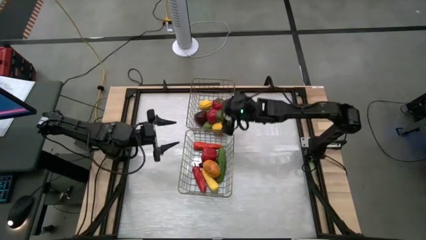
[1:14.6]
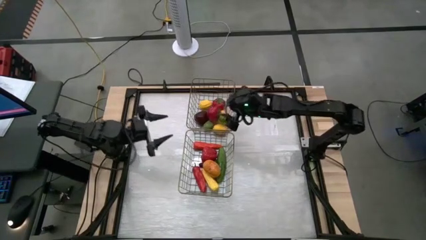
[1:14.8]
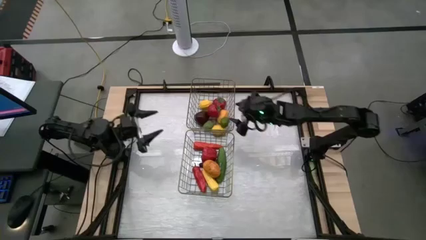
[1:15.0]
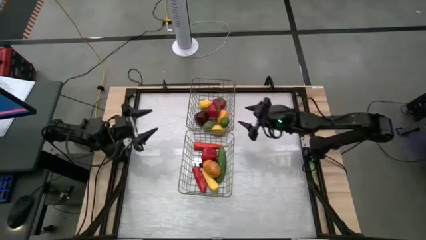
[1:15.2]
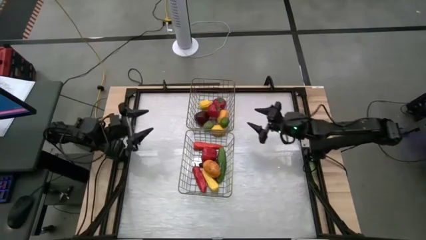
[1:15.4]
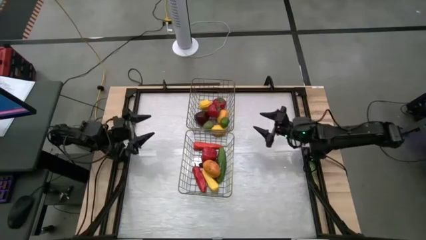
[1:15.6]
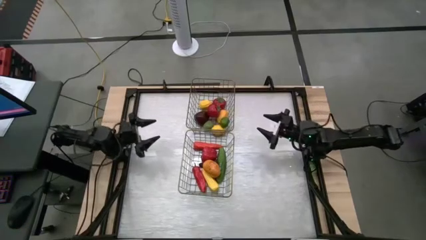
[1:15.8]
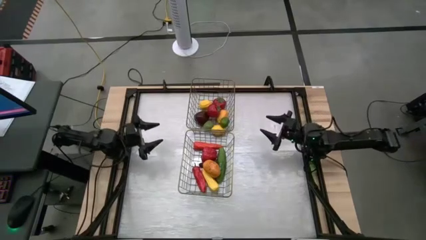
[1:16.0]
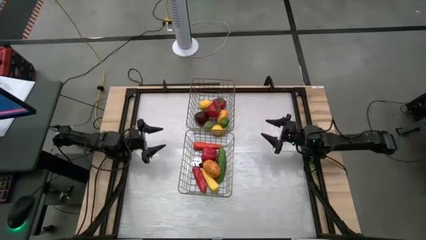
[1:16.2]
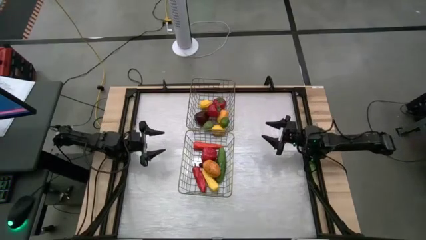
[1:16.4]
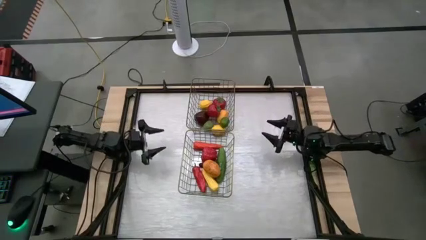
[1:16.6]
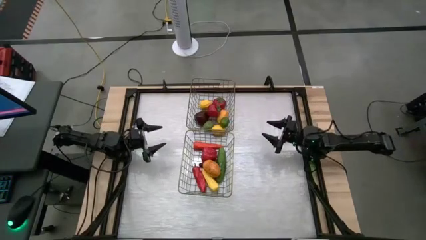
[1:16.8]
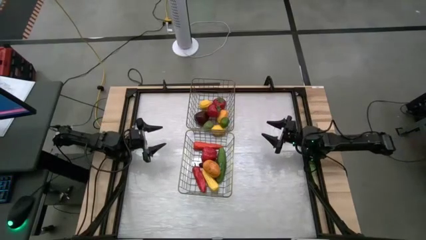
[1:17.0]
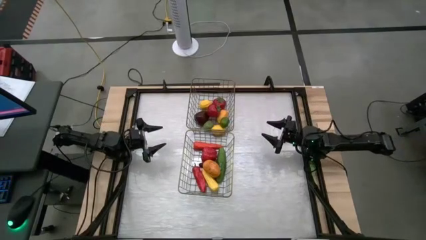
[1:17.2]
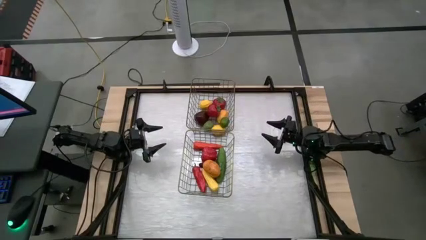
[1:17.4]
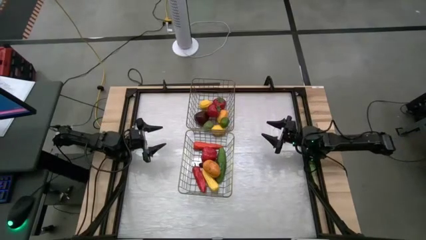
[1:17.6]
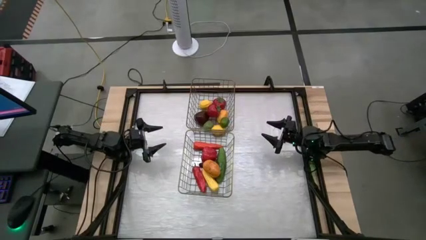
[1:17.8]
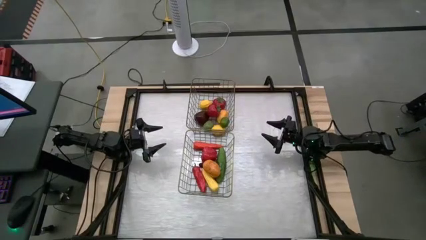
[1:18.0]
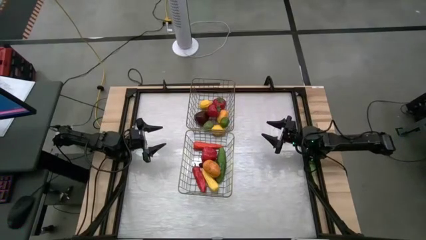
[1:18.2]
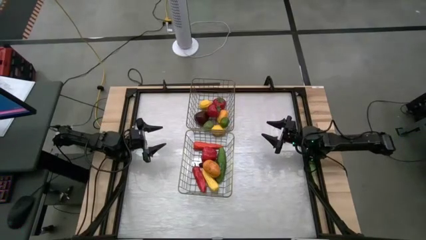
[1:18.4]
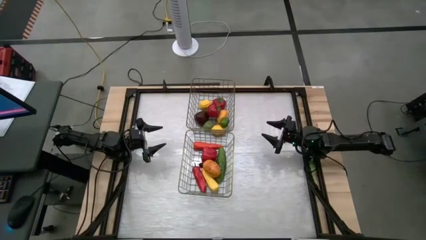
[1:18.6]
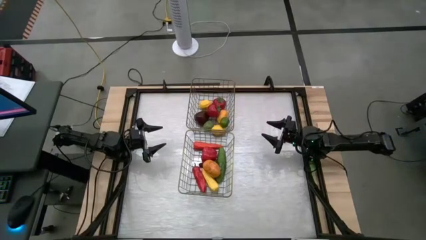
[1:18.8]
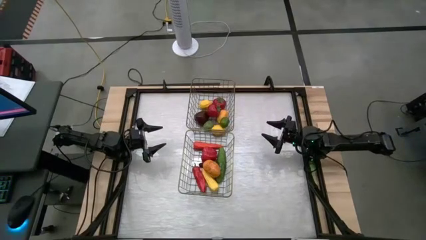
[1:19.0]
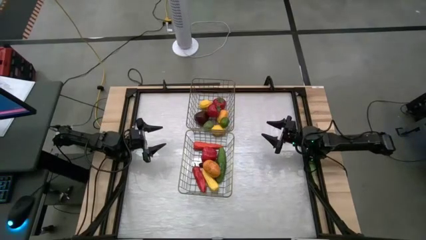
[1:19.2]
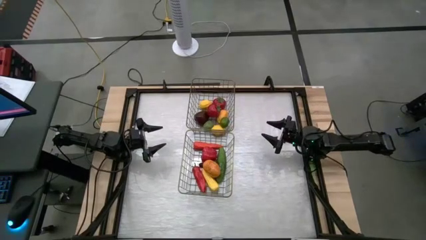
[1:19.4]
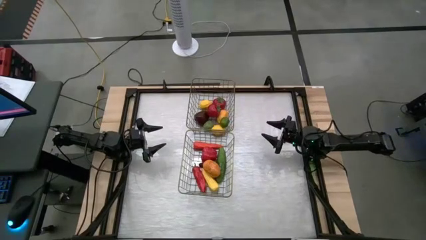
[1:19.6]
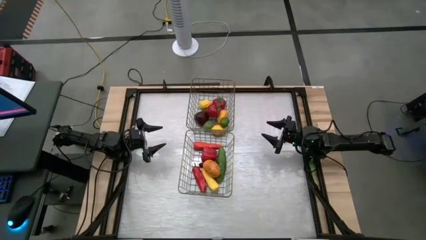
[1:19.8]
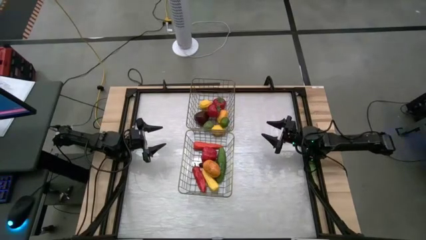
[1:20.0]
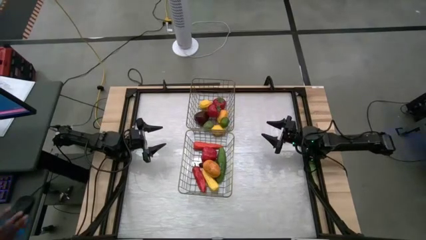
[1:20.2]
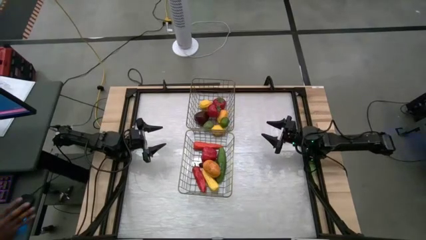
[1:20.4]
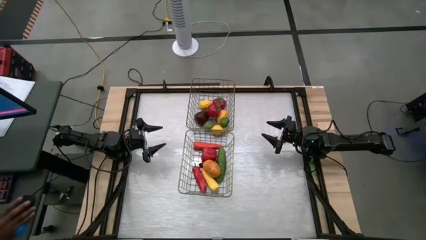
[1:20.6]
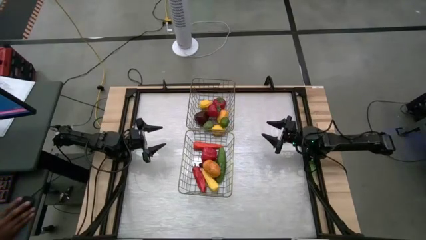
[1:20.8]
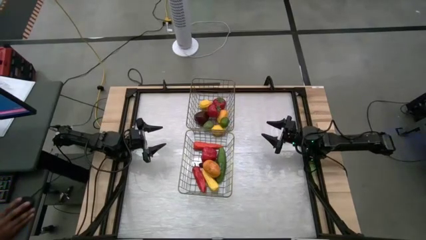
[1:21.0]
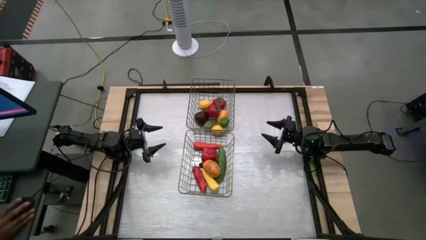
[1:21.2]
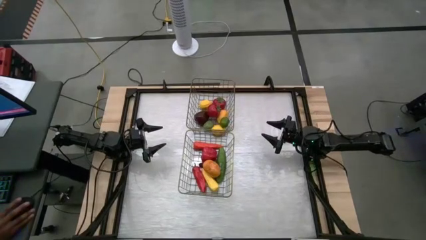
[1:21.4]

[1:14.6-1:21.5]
Task: Sort produce into baskets
Return to Home Position

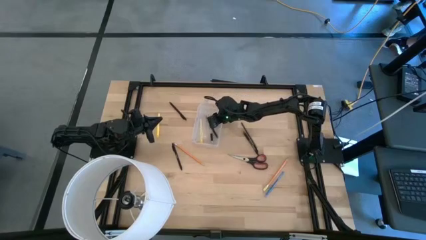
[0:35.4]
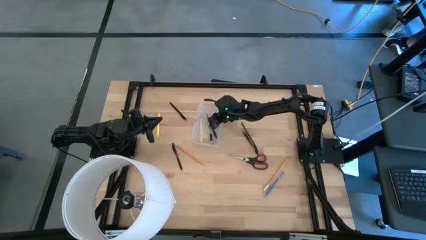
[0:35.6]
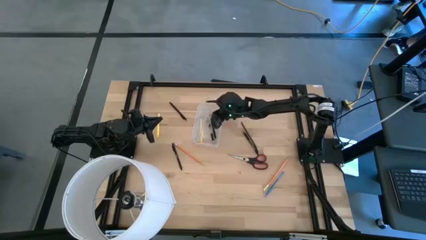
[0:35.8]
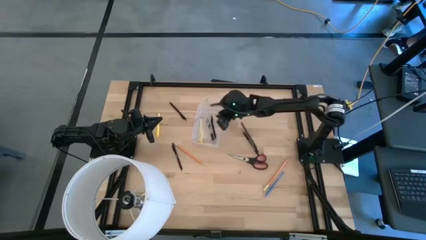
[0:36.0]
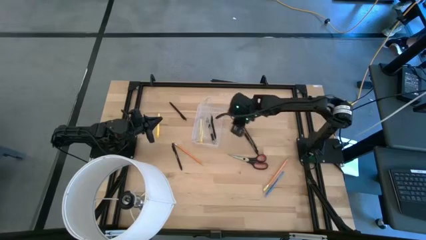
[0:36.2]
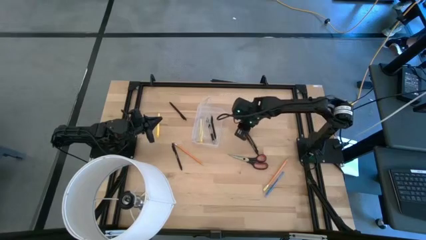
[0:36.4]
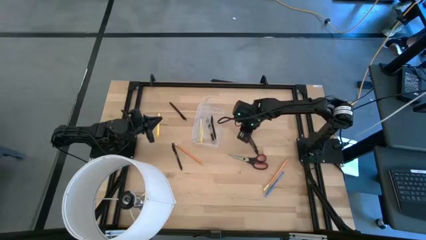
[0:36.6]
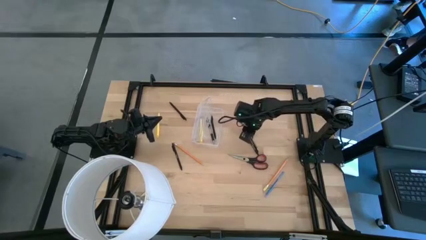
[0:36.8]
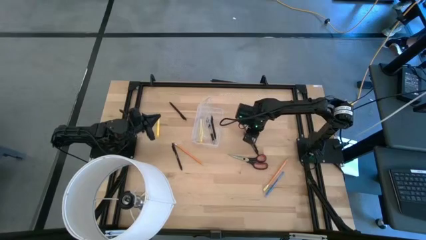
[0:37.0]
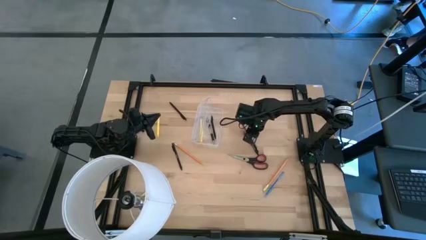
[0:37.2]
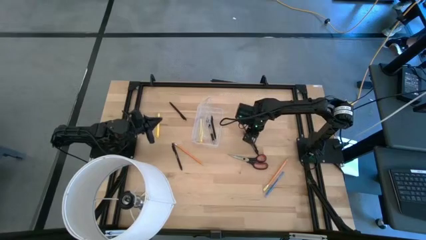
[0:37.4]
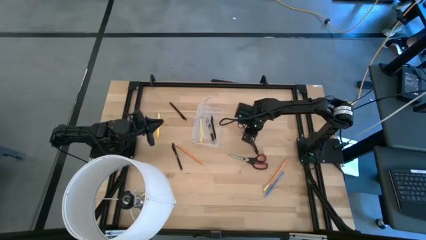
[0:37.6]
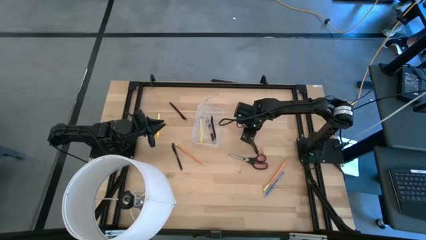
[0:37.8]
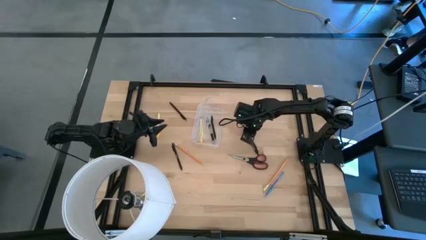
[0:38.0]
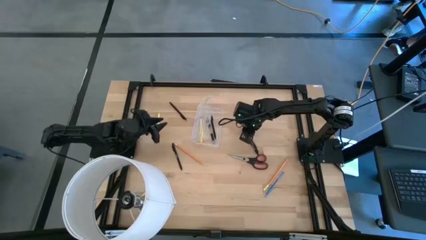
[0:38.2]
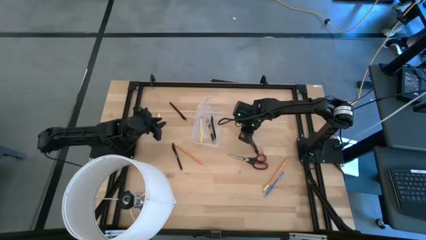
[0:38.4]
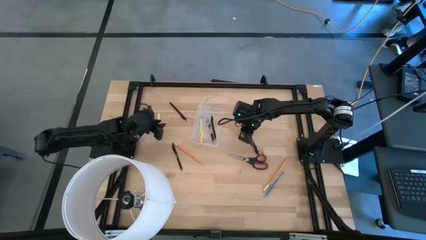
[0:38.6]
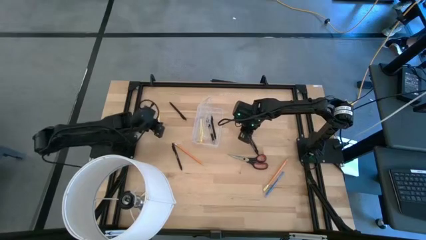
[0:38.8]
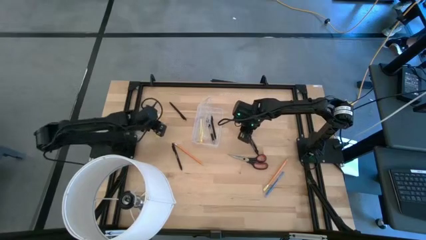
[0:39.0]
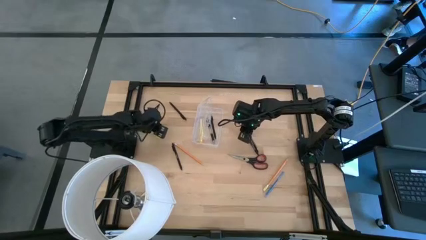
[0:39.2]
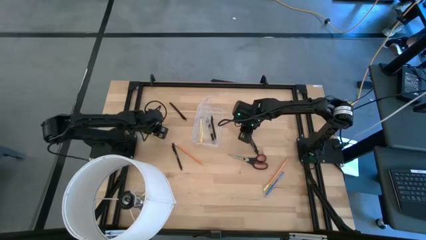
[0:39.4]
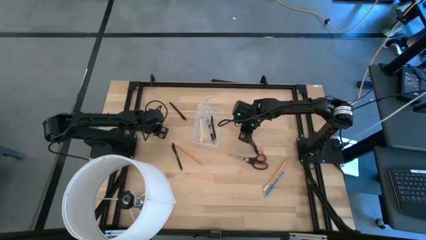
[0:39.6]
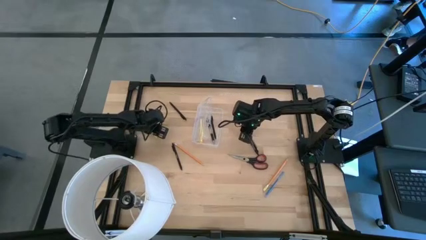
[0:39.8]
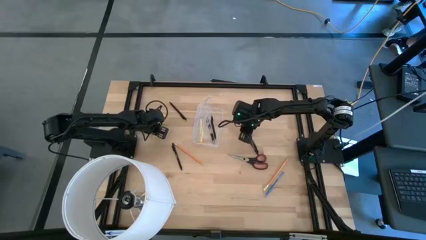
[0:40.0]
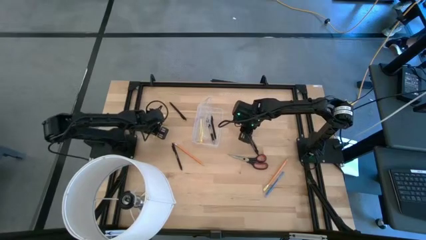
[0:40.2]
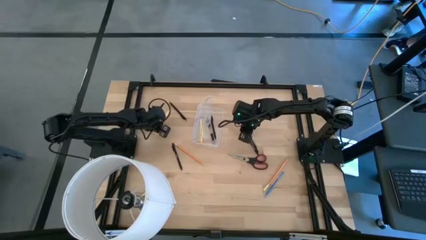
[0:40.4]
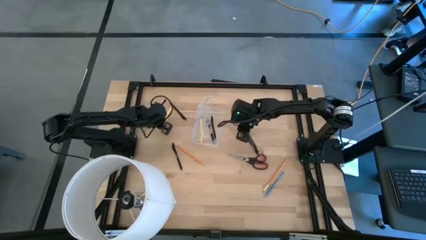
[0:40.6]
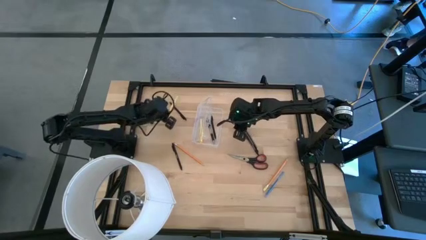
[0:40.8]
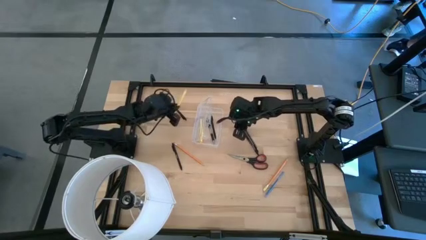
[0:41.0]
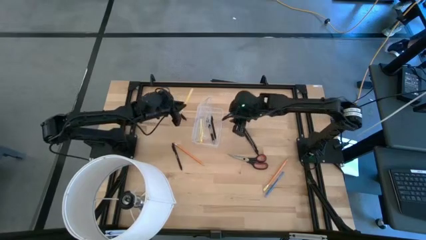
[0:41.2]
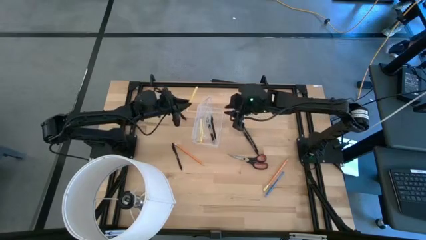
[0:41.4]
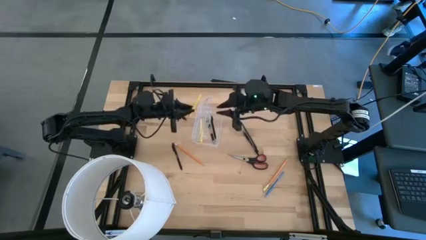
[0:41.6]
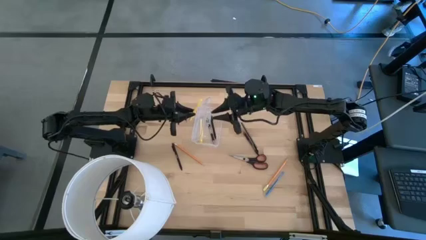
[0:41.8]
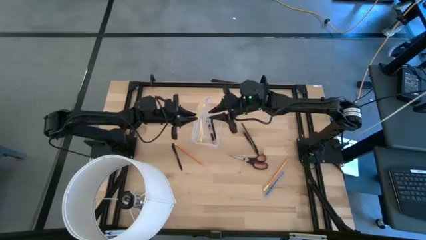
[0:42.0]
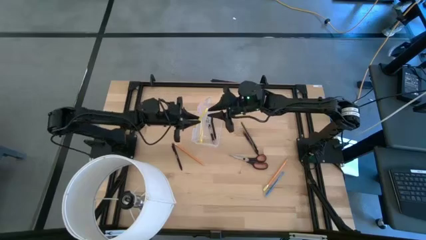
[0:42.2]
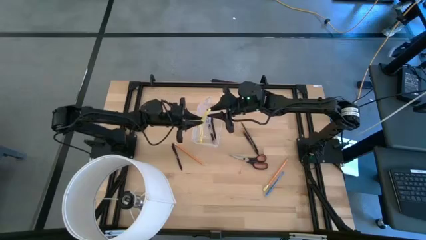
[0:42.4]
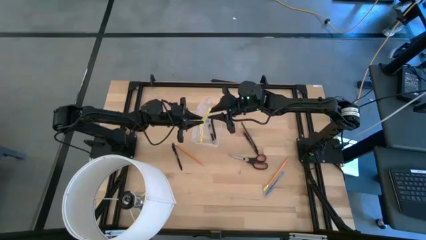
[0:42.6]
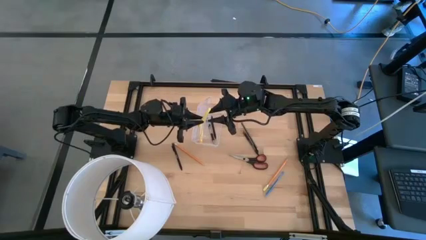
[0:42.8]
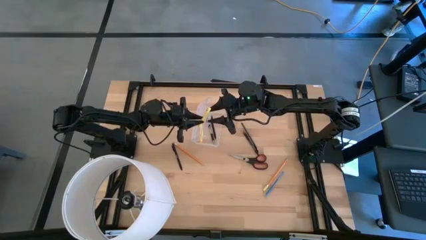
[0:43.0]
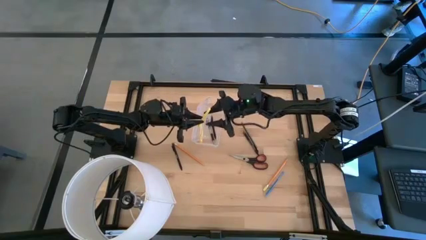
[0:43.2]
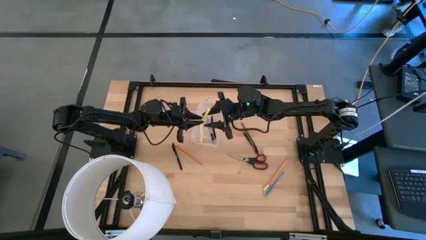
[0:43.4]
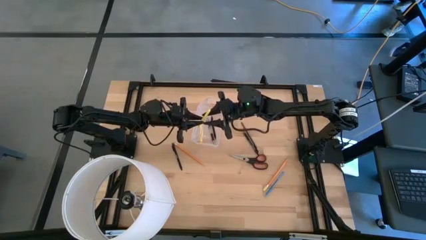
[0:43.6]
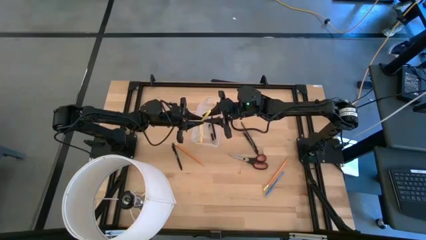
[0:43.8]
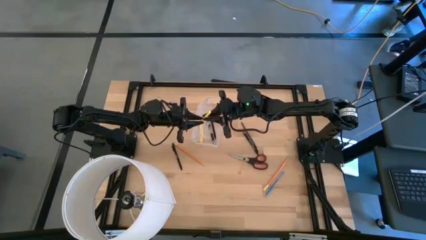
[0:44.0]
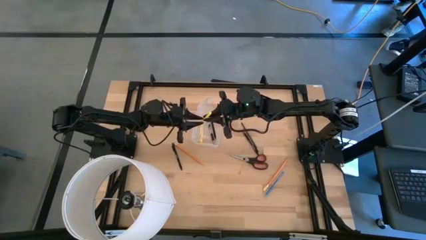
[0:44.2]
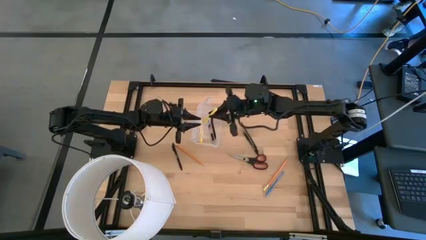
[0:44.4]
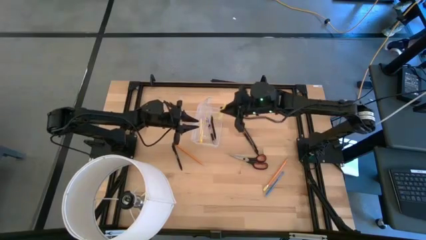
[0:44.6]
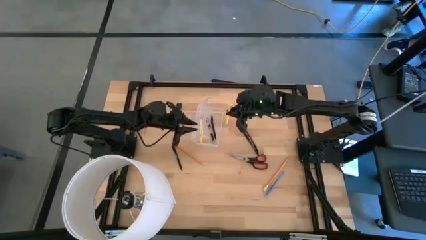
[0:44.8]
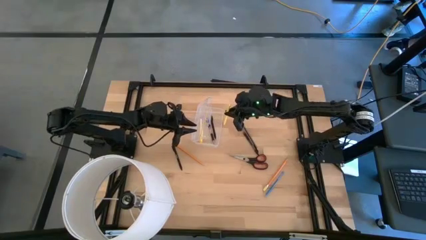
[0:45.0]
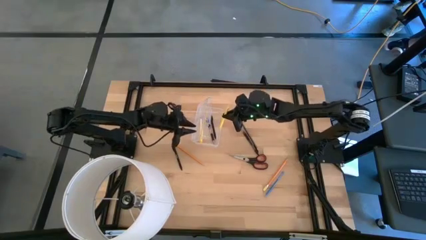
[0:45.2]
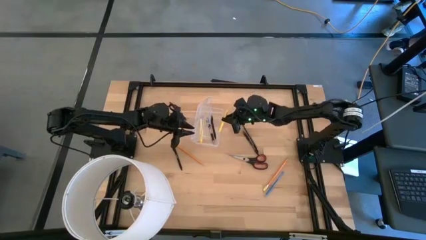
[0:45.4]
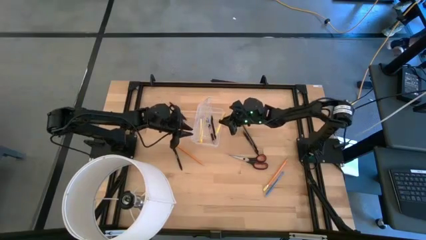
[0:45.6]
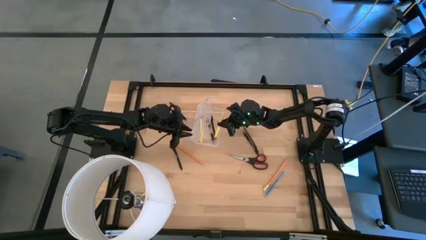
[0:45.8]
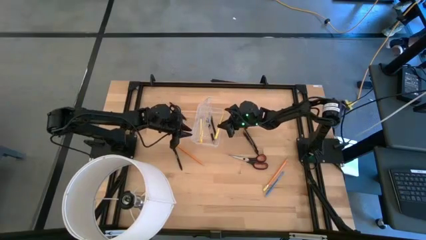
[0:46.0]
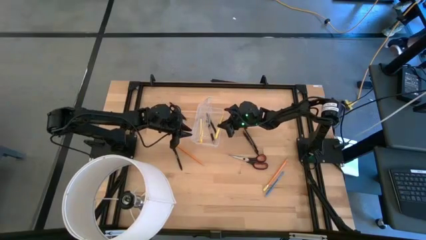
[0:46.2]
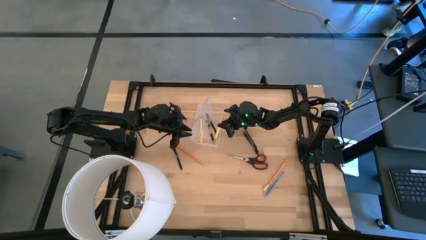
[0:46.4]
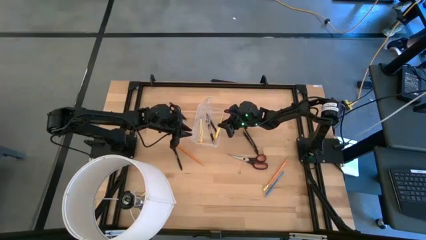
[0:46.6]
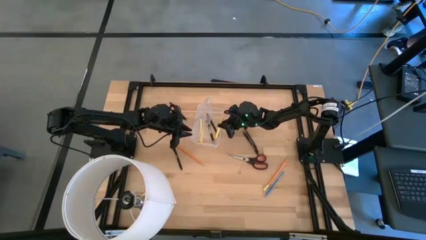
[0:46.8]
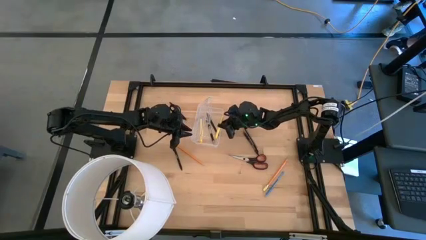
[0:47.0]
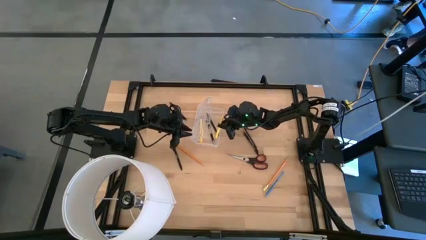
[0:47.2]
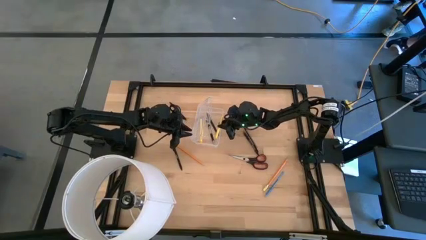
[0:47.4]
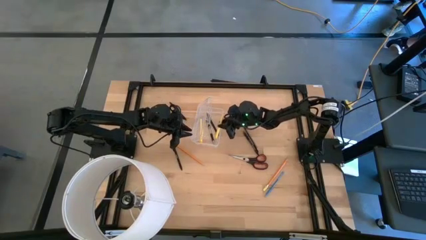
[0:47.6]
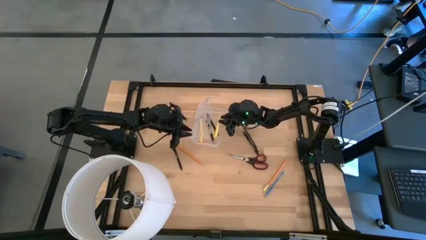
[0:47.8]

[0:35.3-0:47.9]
Task: Pick & place school supplies into a supply box
Put the yellow pen into the transparent supply box
